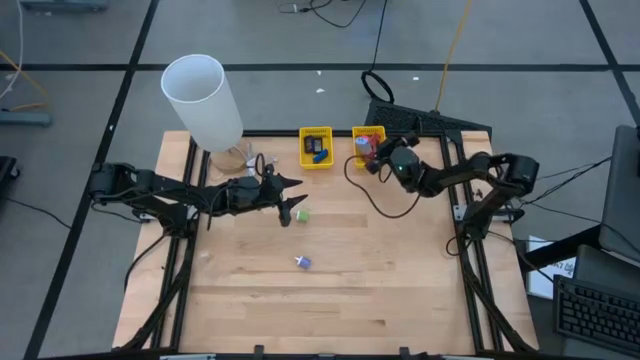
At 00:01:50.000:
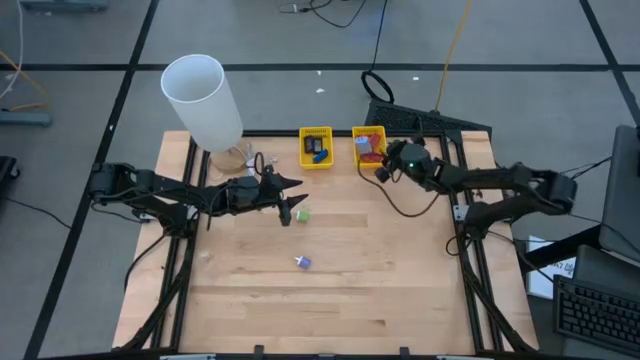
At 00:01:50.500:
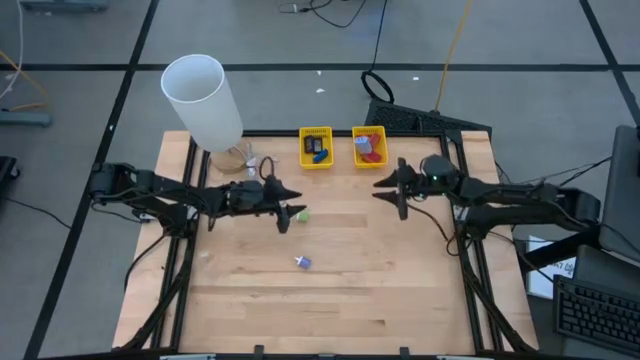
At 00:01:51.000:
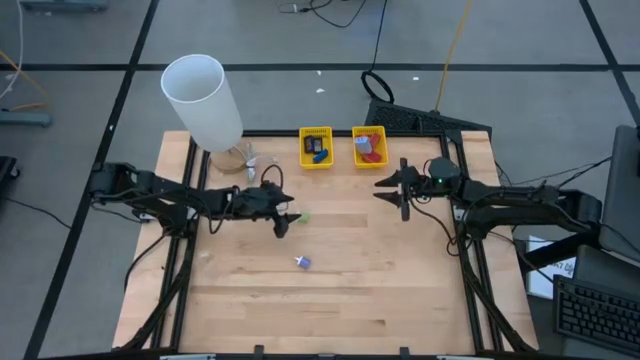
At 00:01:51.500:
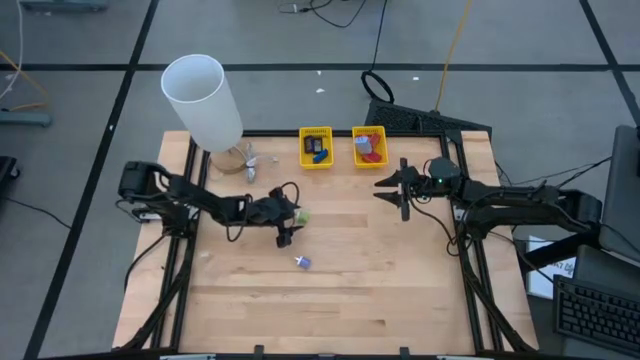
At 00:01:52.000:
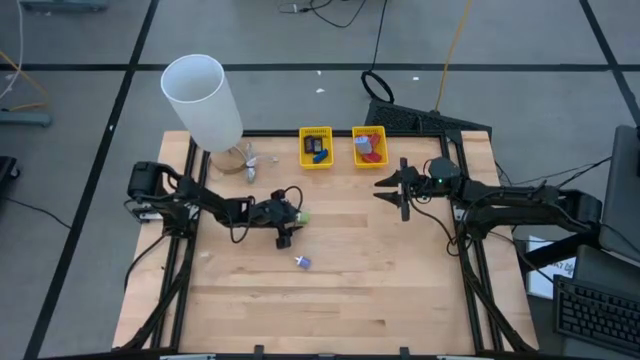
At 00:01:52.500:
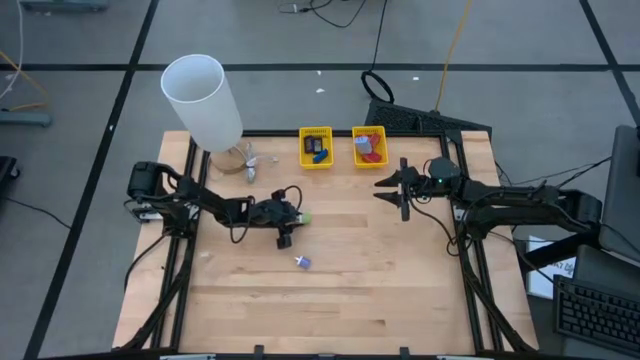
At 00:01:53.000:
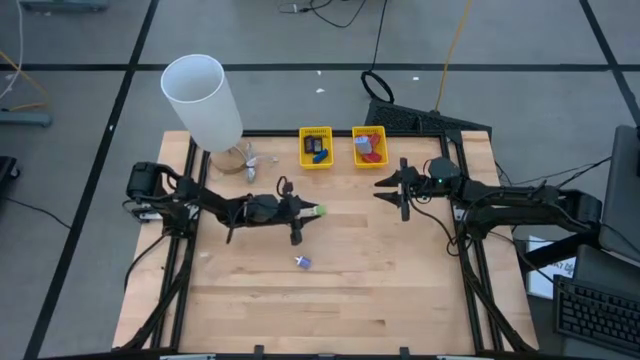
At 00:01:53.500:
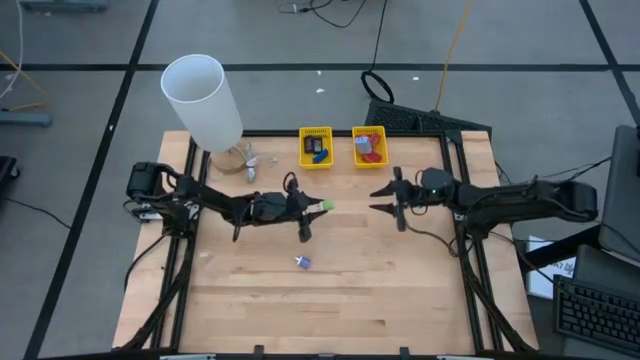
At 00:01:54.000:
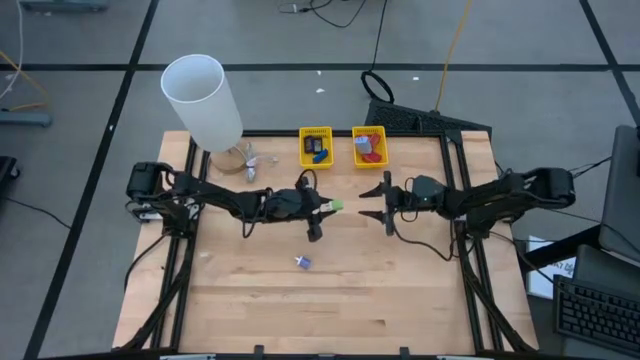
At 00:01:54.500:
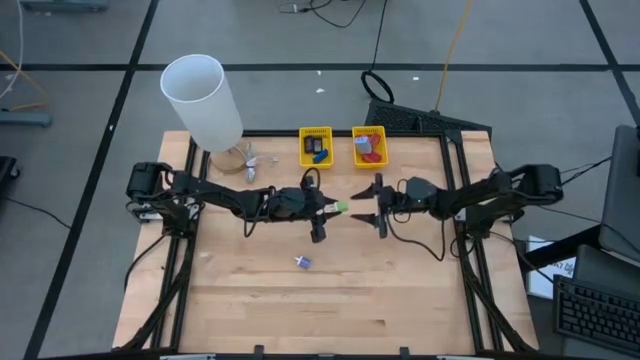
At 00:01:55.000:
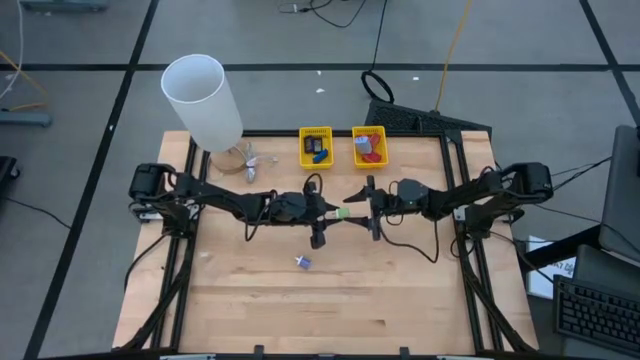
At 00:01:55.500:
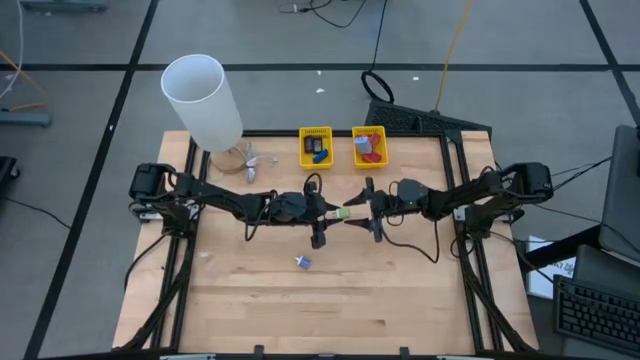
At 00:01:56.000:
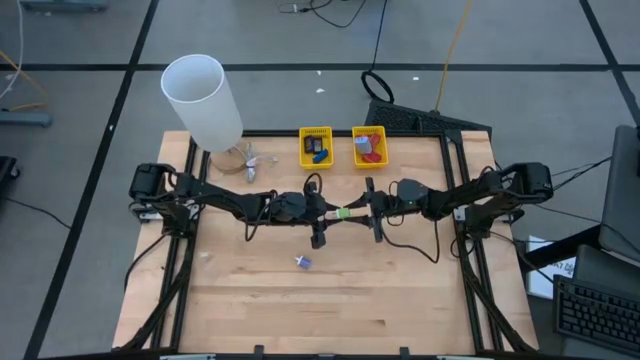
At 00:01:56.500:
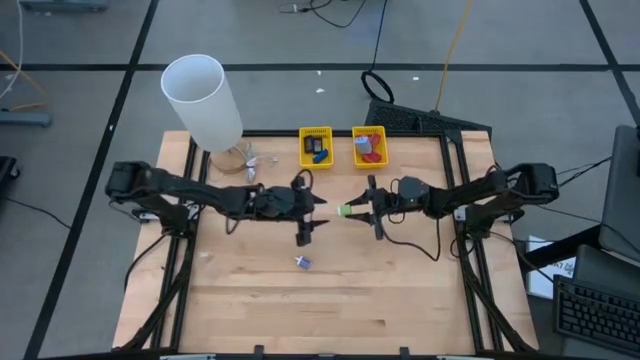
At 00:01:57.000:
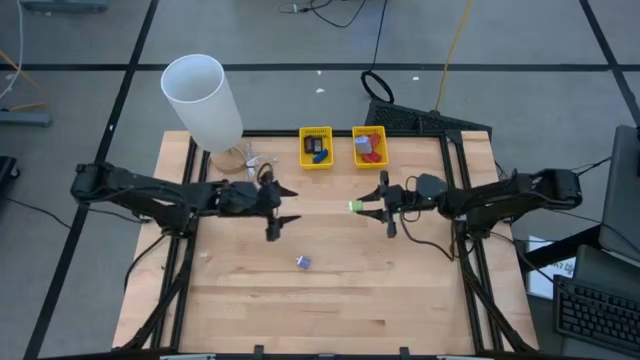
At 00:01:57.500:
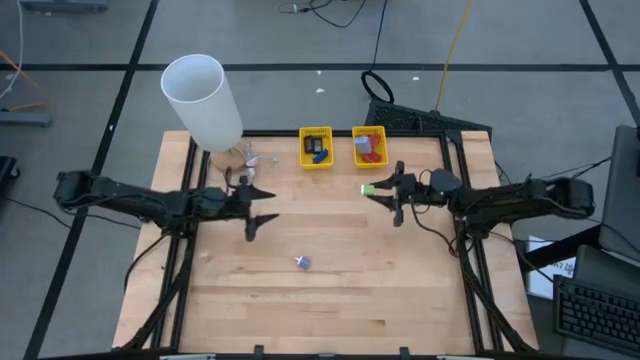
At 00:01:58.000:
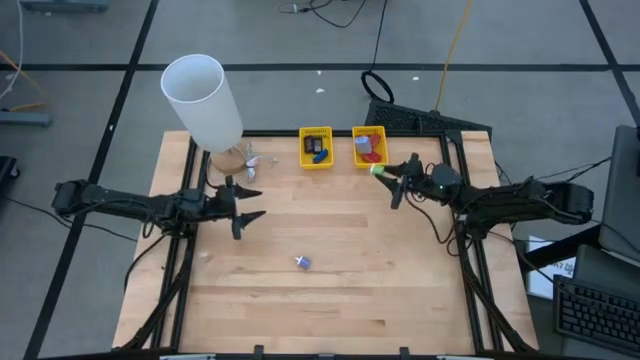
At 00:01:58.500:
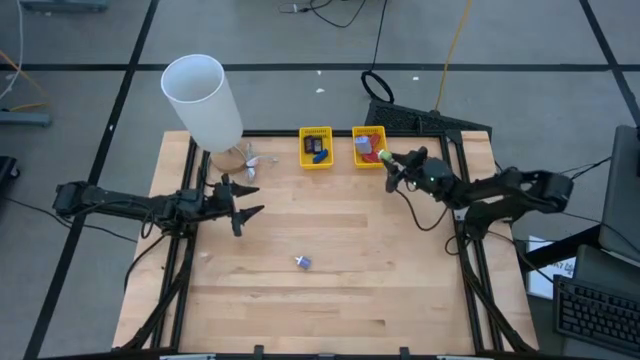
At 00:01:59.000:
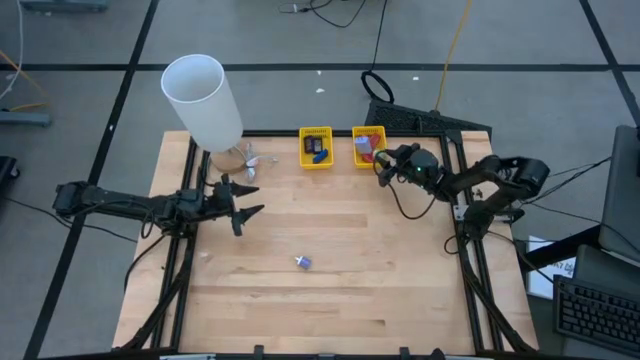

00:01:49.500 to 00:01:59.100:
Task: Pick & Place Office items
Put the green charger adapter into the right yellow bin

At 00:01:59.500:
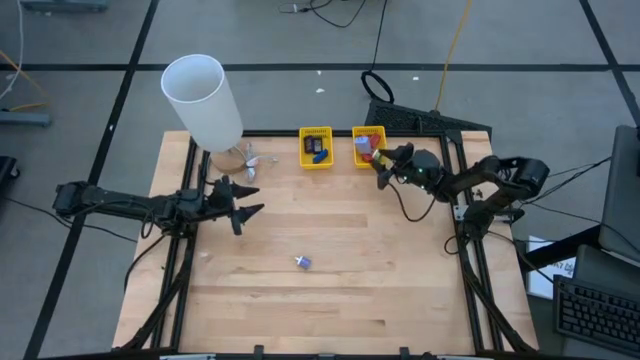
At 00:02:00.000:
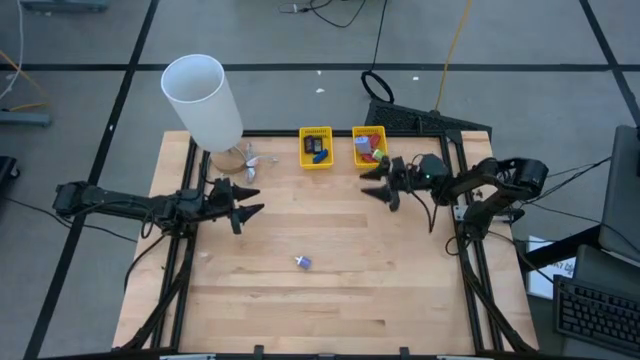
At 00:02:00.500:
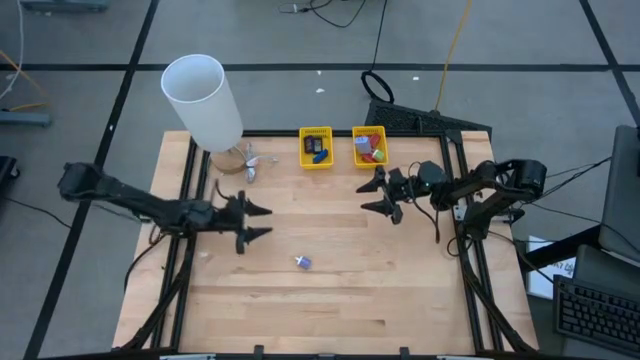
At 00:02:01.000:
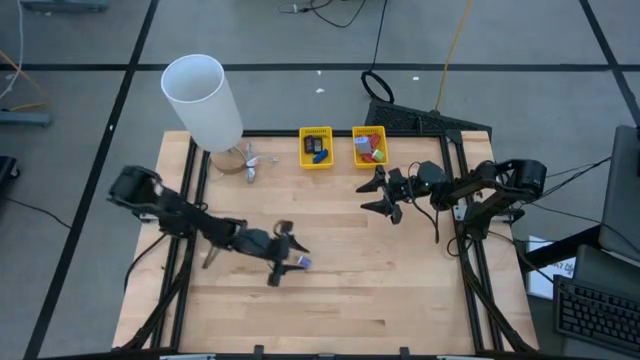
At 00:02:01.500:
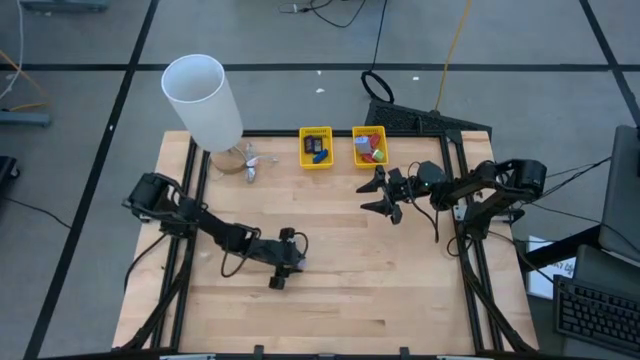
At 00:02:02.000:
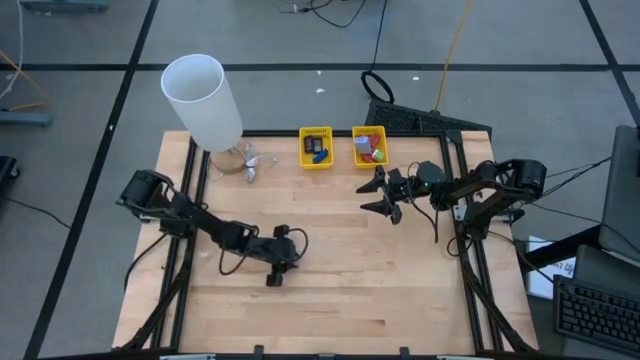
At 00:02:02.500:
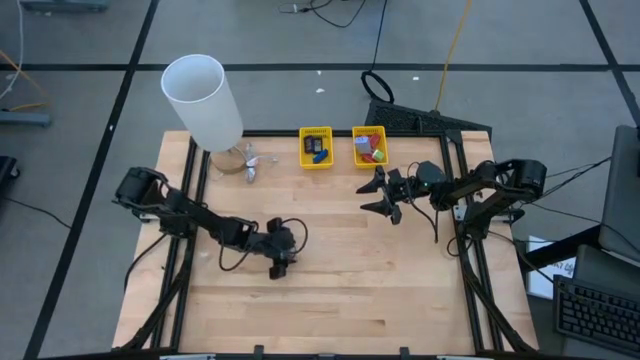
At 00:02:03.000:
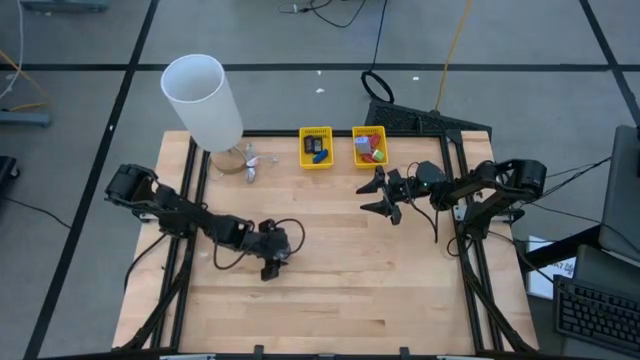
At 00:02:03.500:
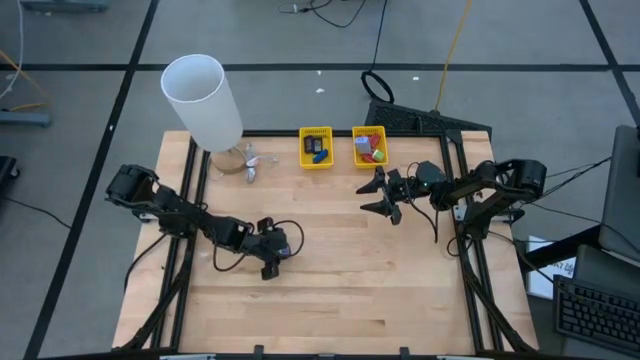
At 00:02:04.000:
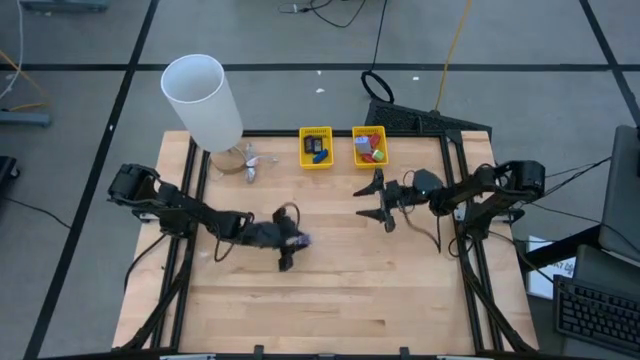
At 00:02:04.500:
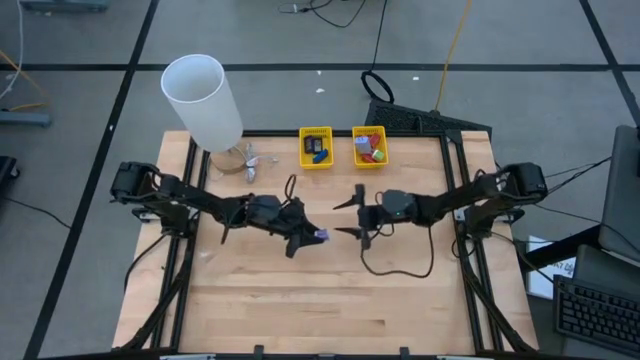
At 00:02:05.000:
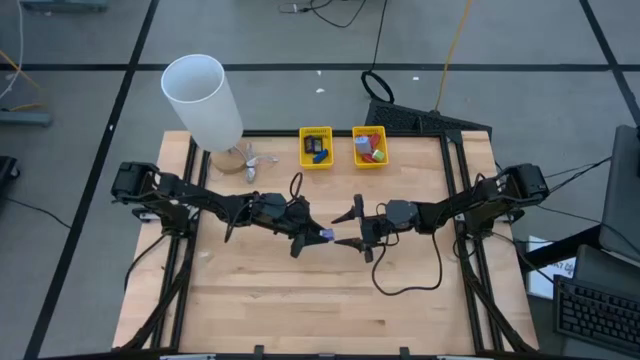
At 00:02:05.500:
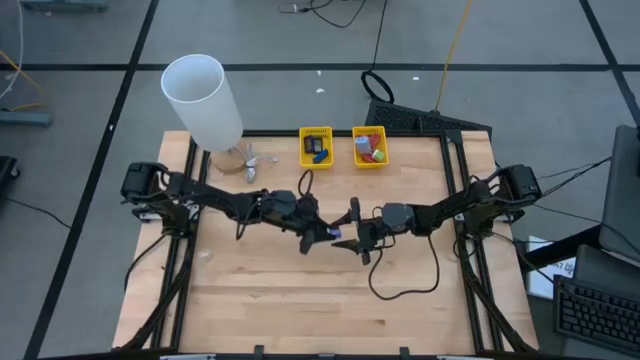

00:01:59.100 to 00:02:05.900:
Put the violet charger adapter into the right yellow bin

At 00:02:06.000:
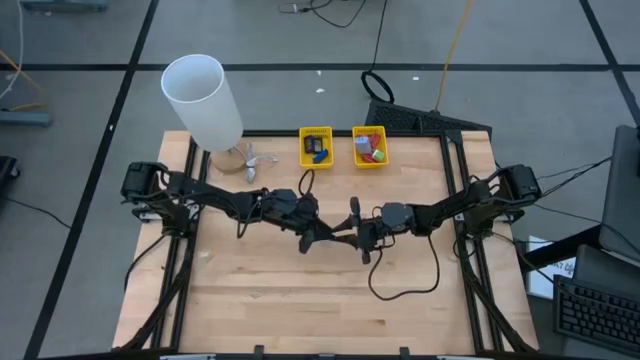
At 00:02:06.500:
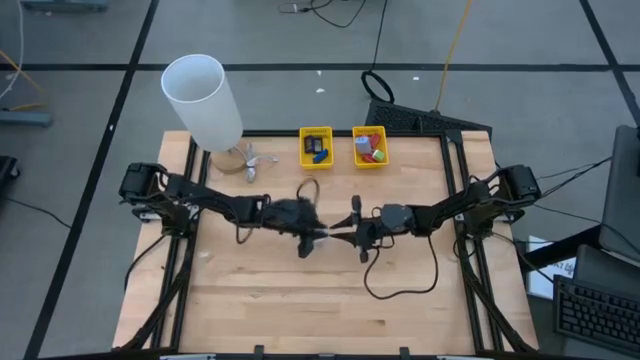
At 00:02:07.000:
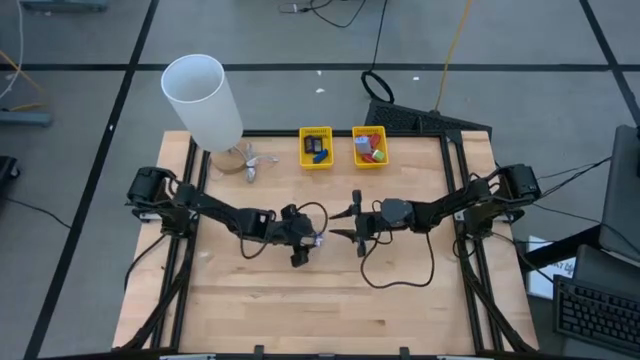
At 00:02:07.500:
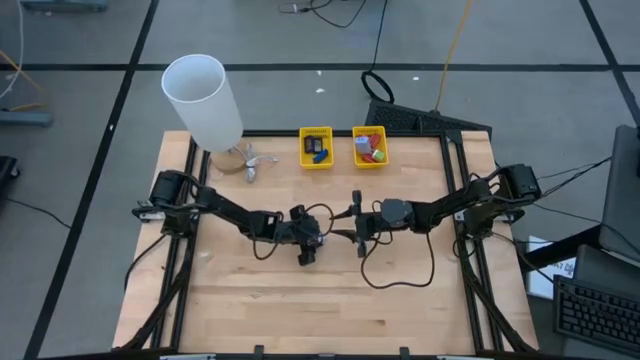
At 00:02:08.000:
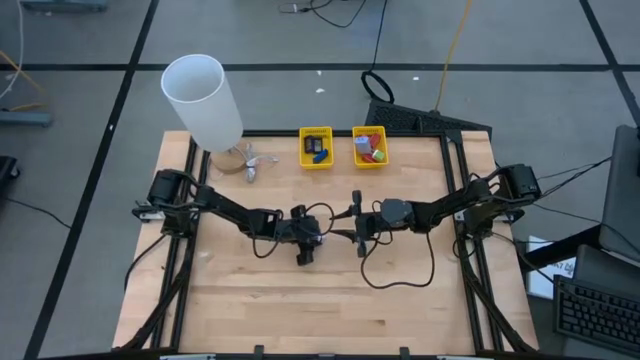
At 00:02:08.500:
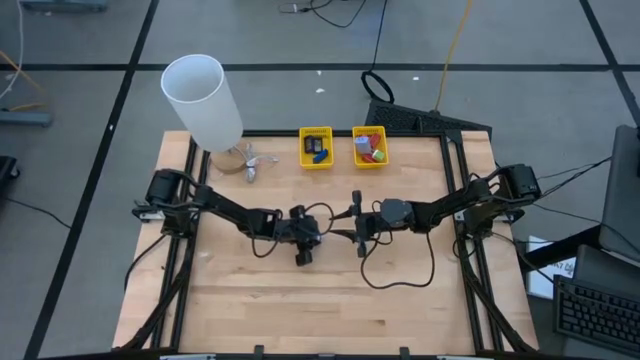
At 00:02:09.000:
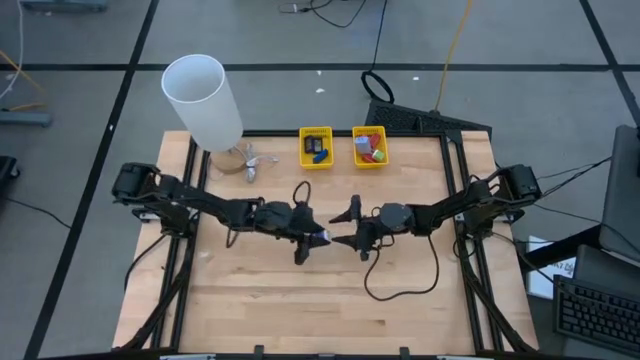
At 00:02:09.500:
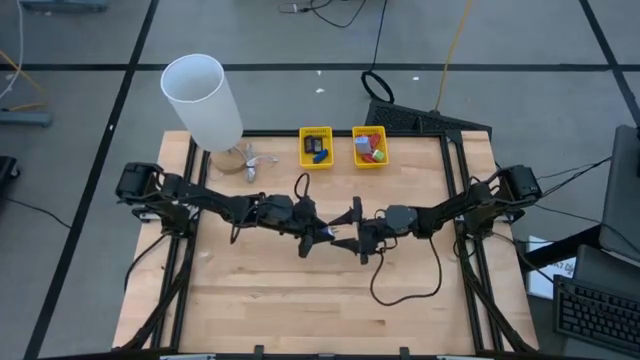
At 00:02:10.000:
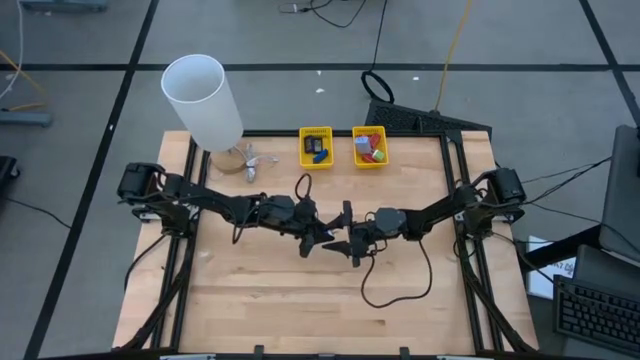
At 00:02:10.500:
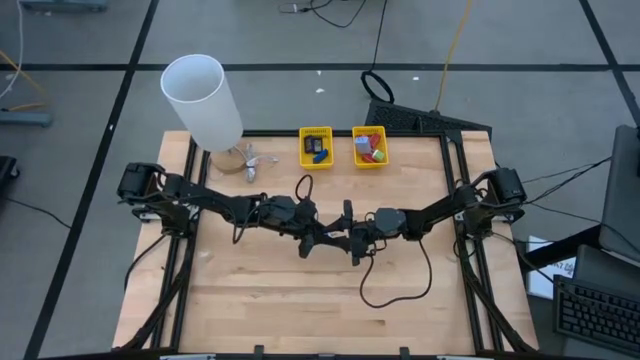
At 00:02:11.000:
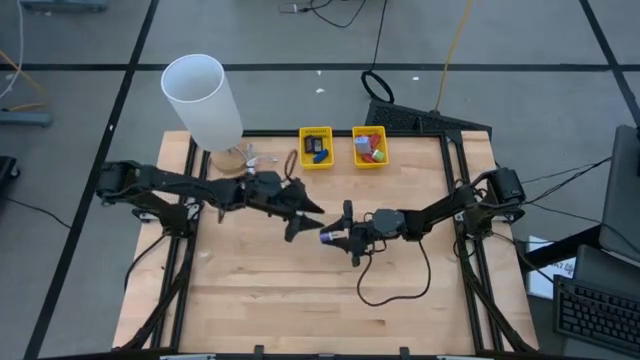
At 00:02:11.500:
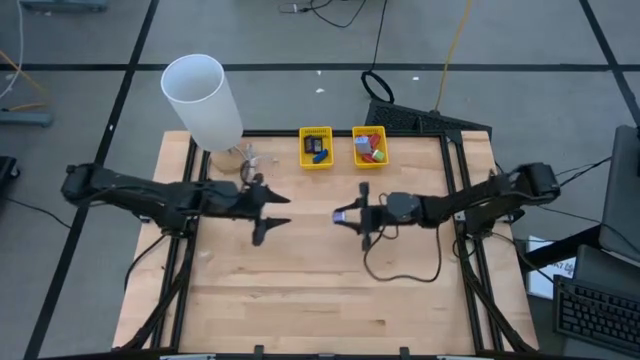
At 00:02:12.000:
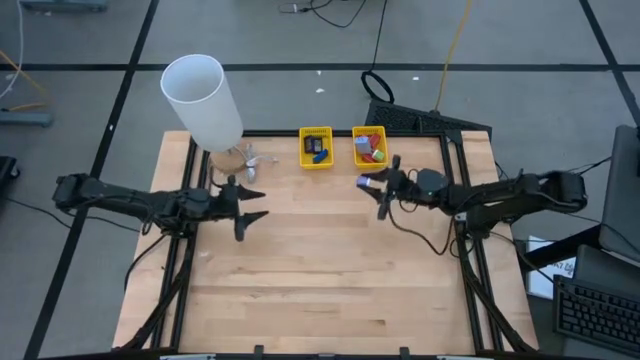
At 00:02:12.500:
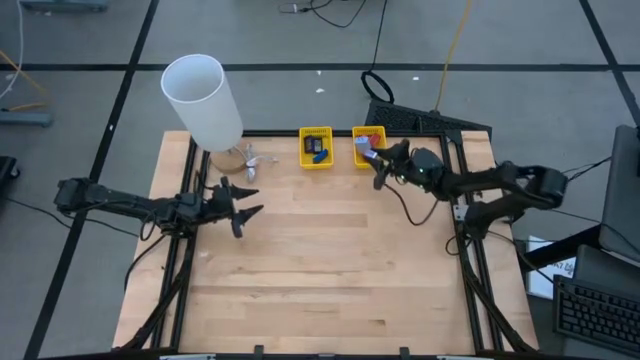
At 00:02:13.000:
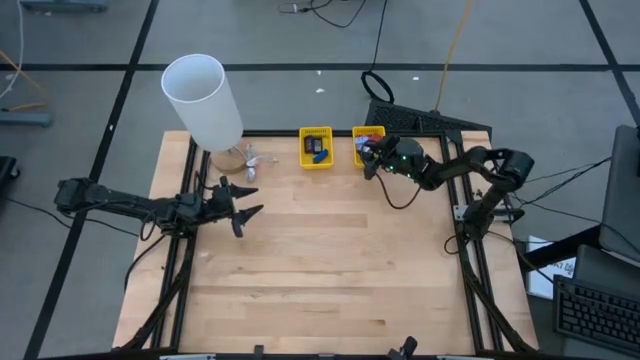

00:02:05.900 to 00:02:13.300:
Put the violet charger adapter into the right yellow bin
